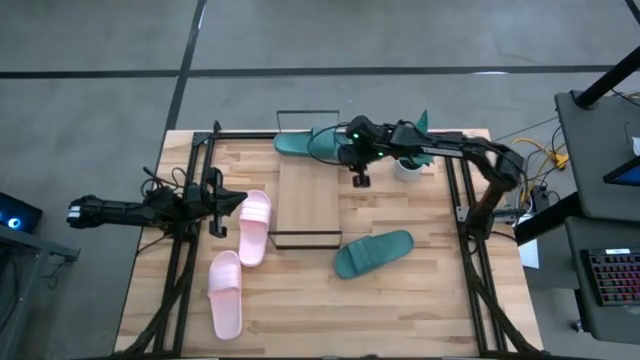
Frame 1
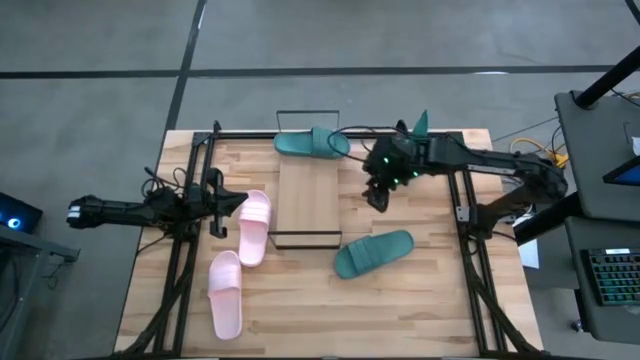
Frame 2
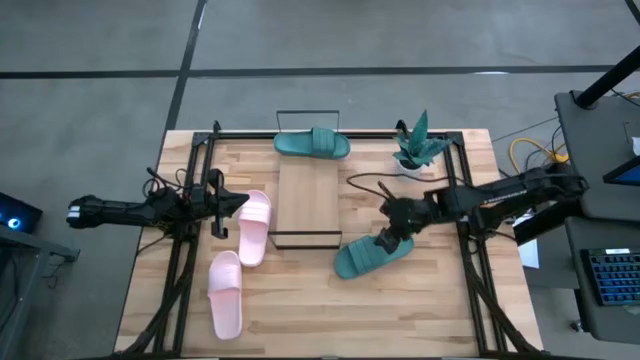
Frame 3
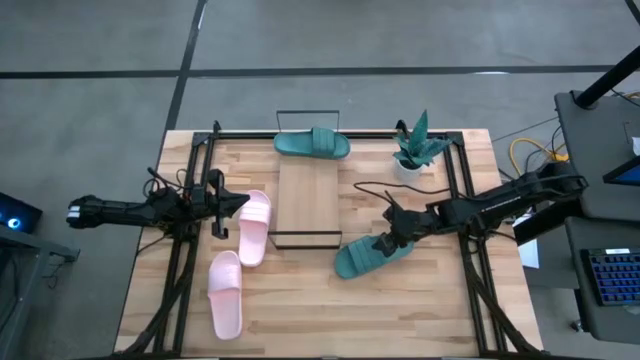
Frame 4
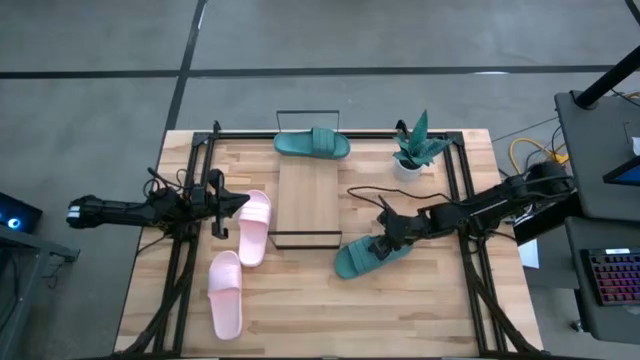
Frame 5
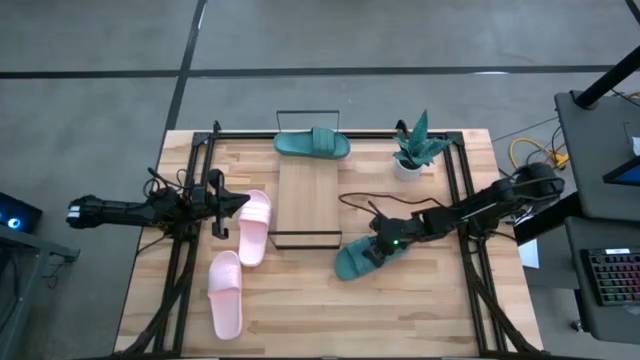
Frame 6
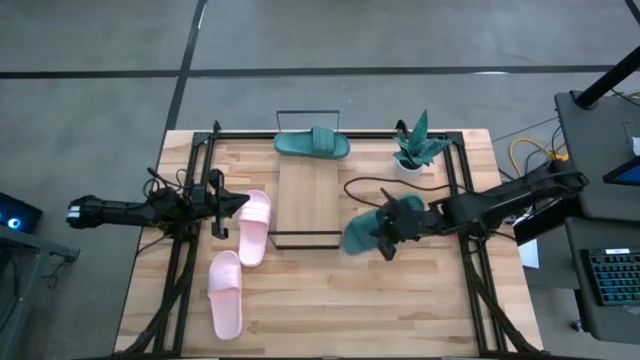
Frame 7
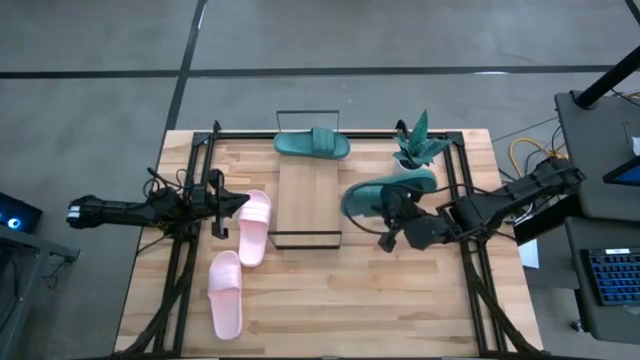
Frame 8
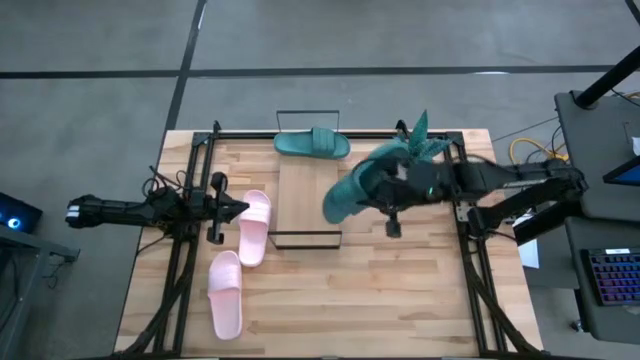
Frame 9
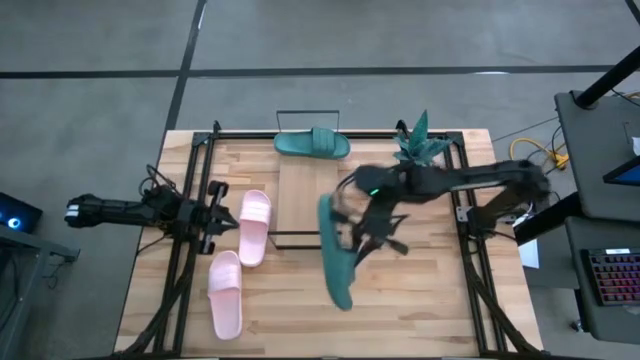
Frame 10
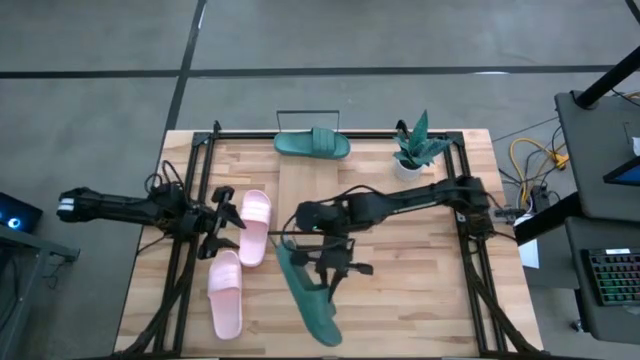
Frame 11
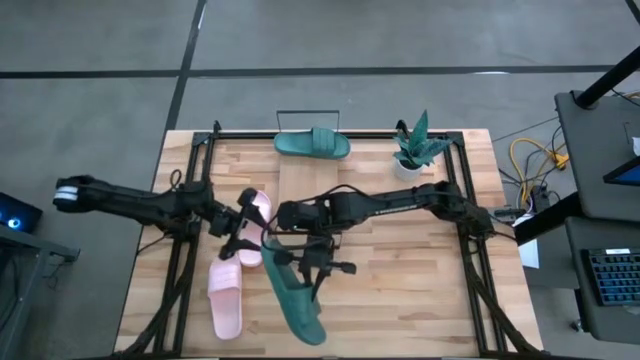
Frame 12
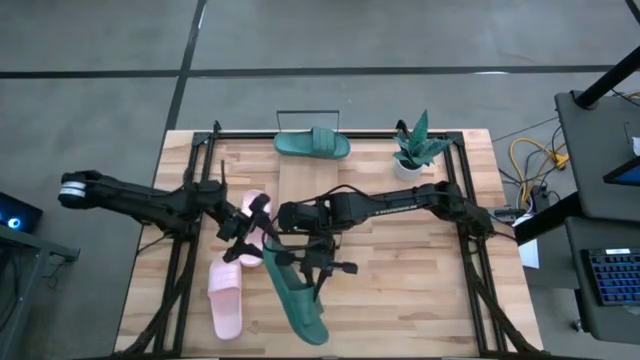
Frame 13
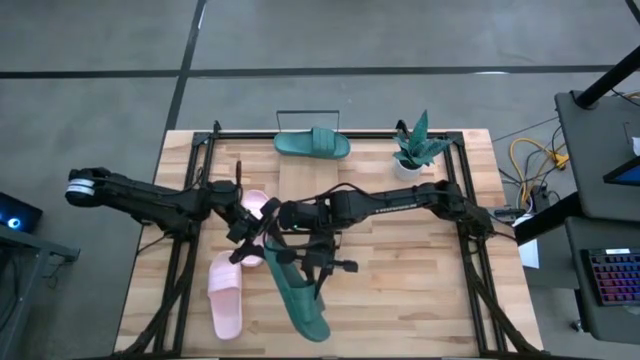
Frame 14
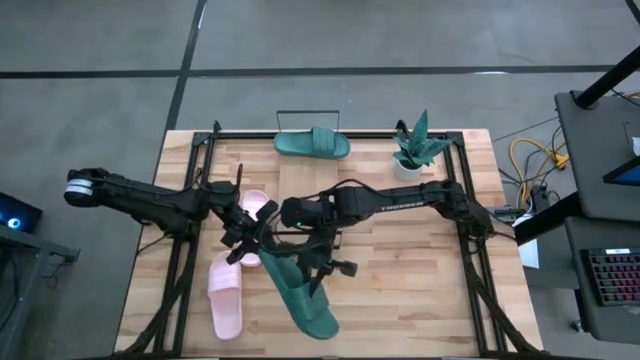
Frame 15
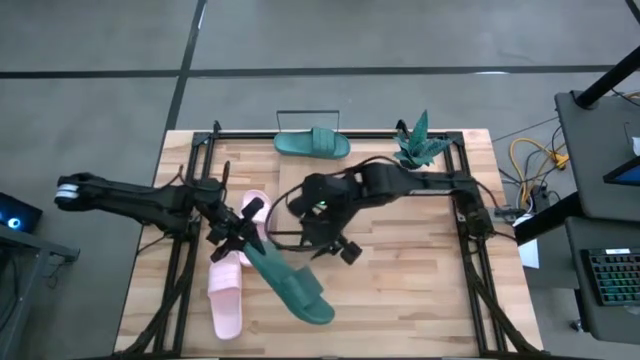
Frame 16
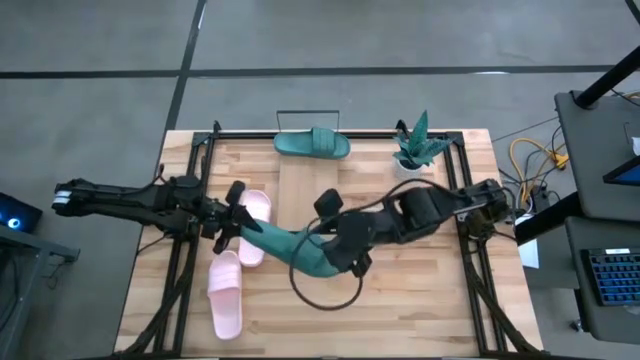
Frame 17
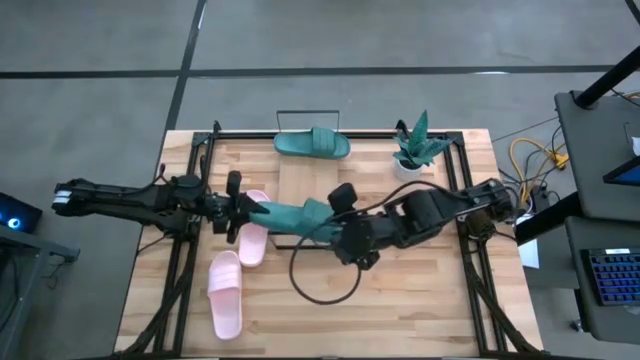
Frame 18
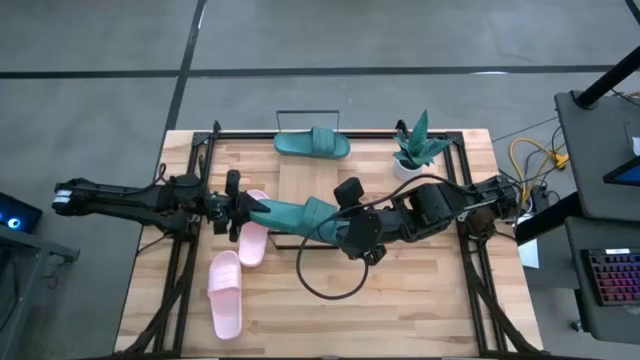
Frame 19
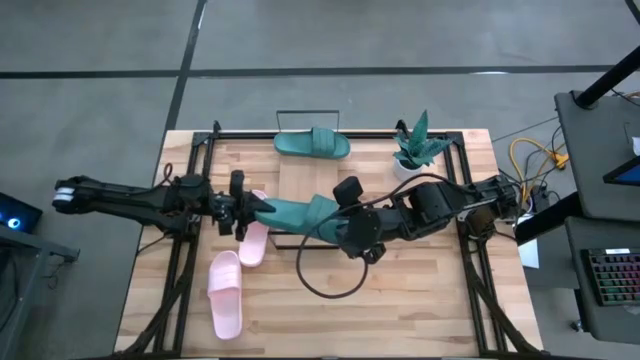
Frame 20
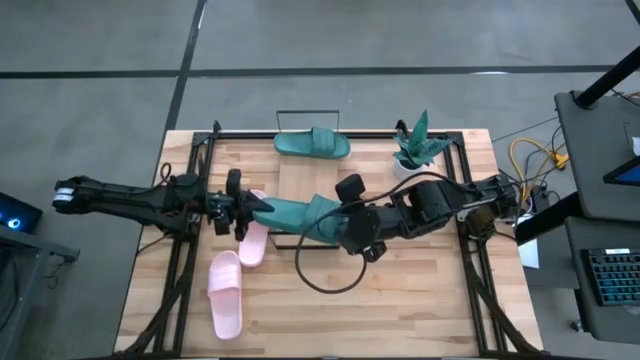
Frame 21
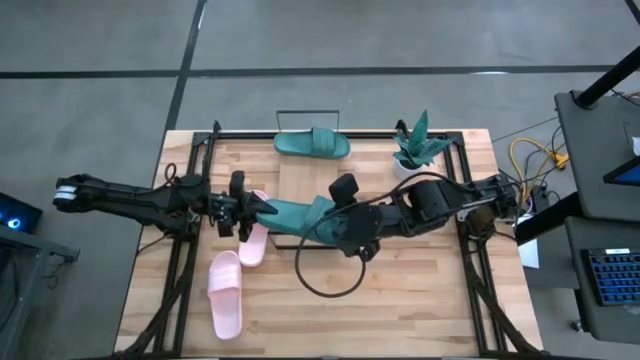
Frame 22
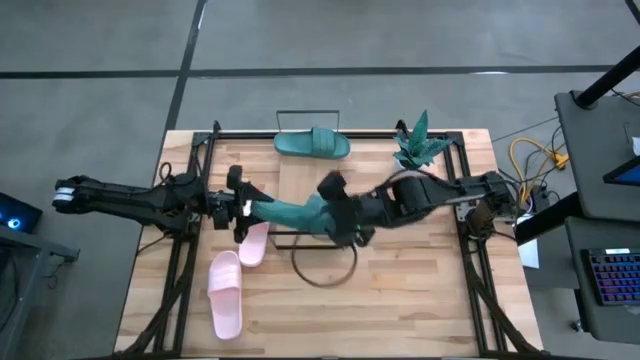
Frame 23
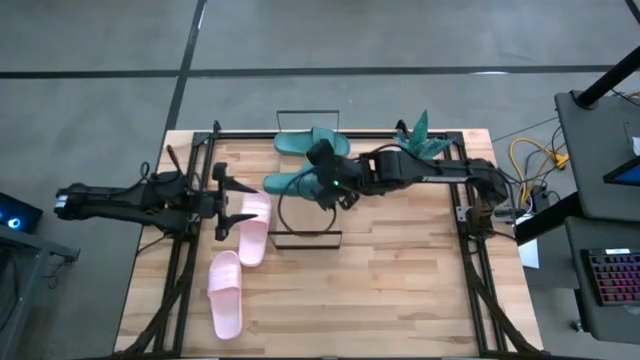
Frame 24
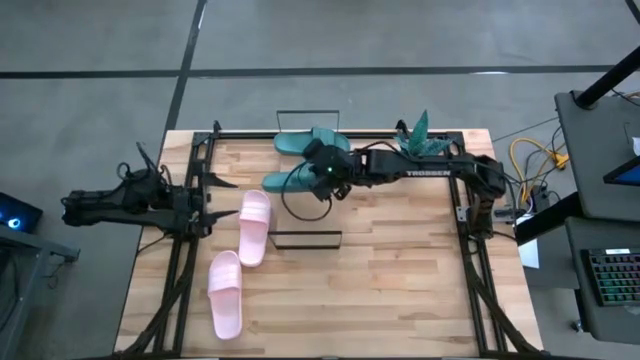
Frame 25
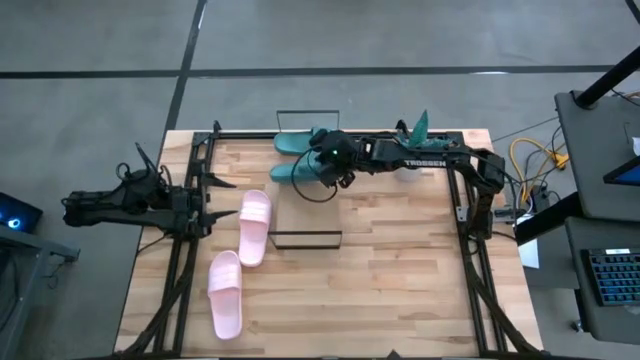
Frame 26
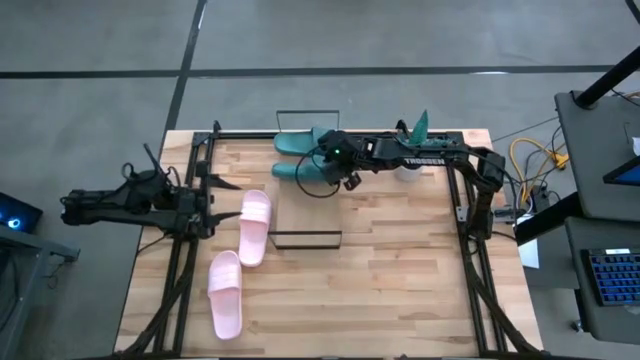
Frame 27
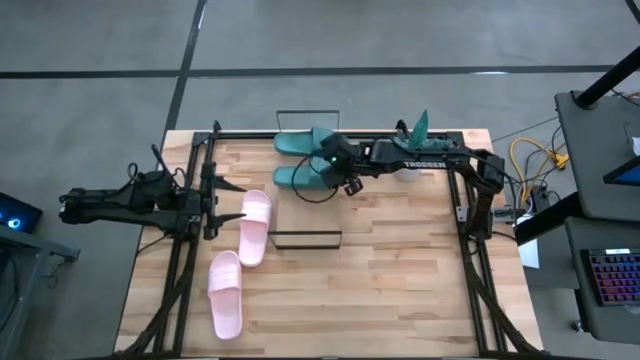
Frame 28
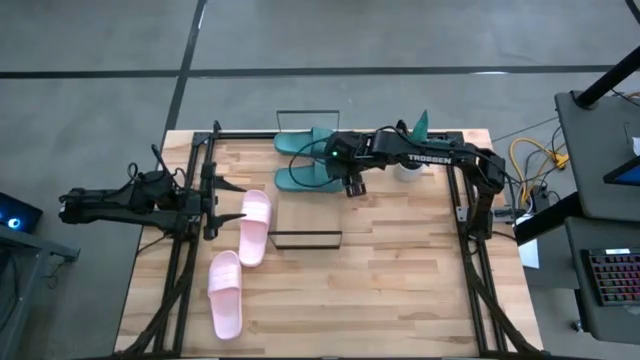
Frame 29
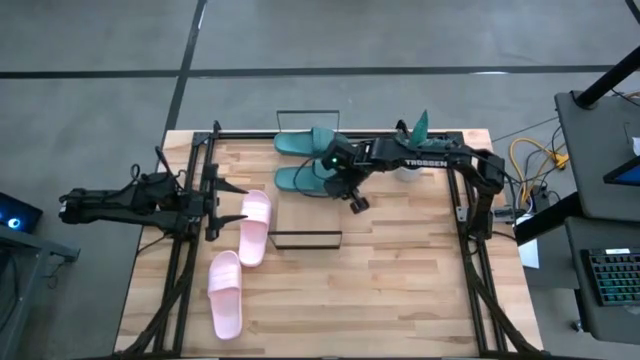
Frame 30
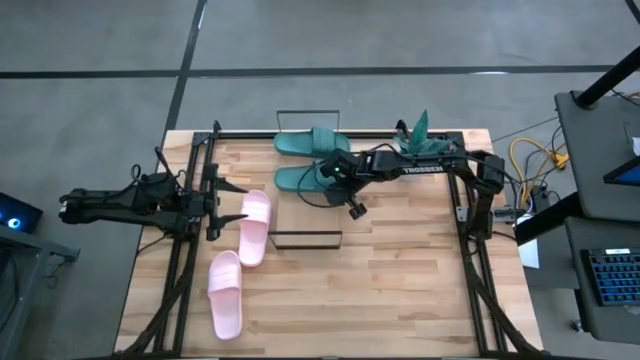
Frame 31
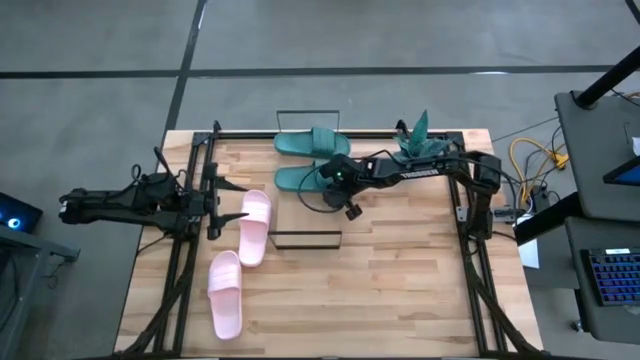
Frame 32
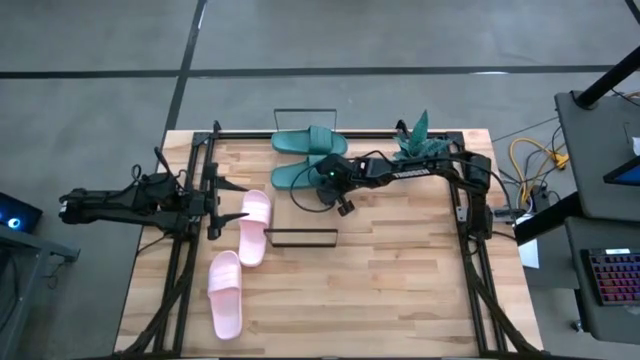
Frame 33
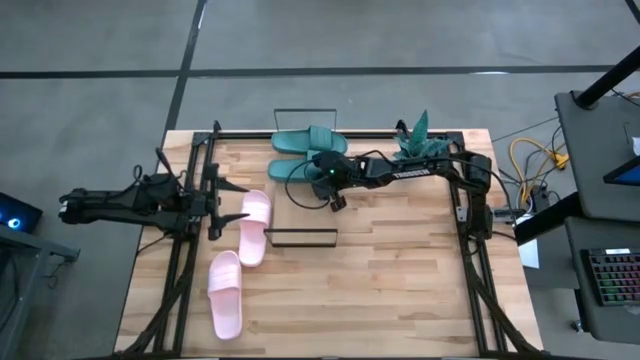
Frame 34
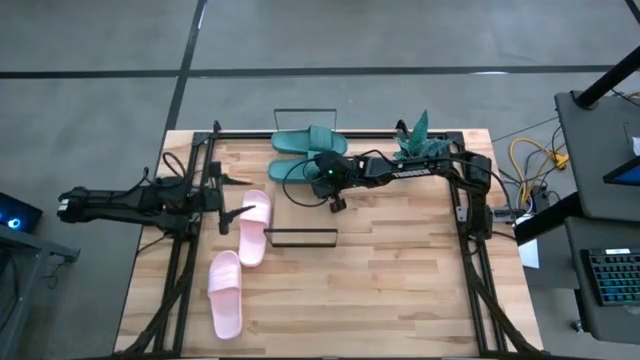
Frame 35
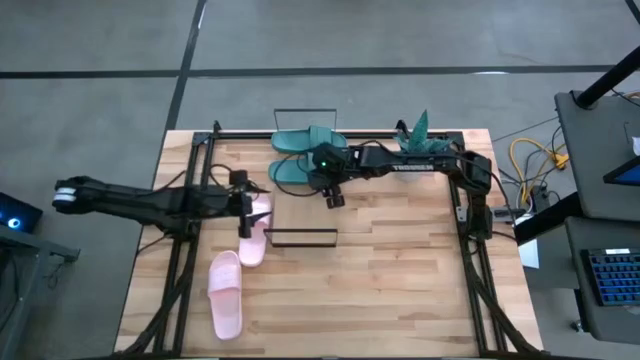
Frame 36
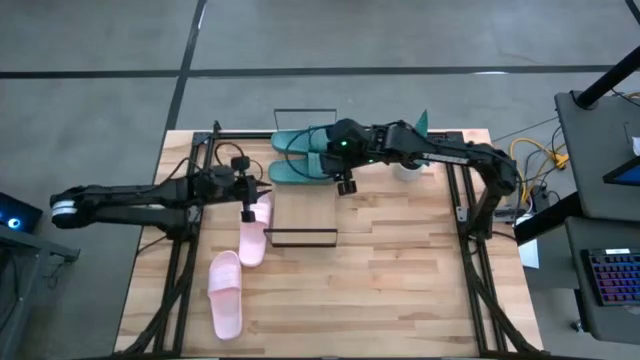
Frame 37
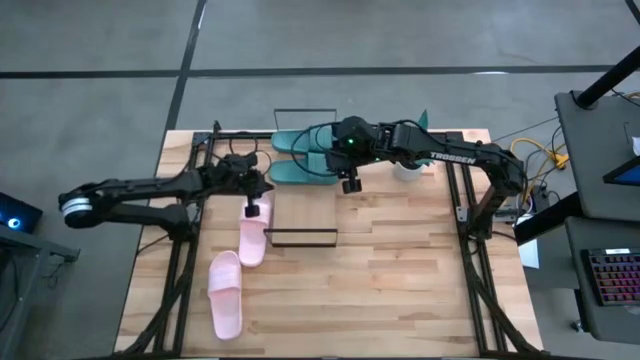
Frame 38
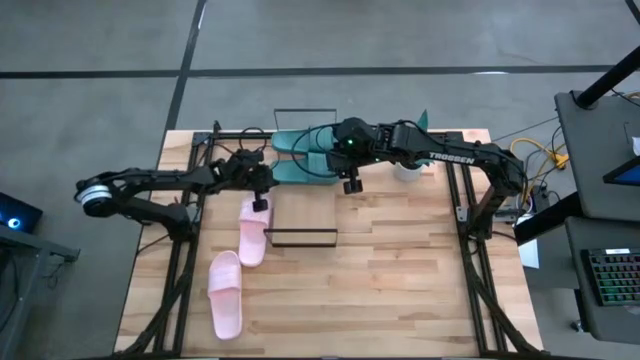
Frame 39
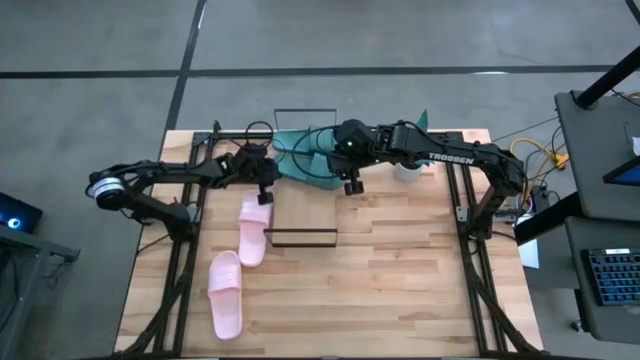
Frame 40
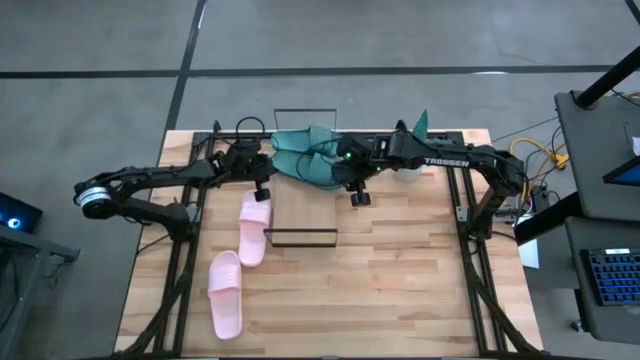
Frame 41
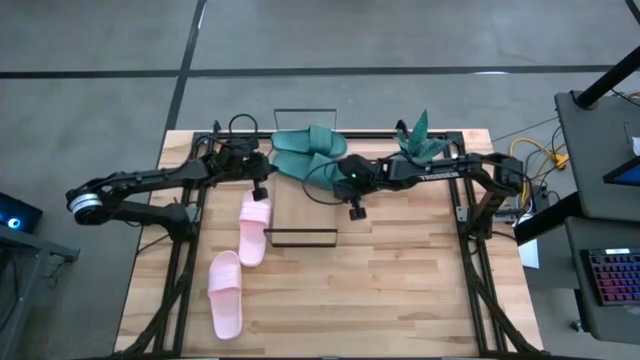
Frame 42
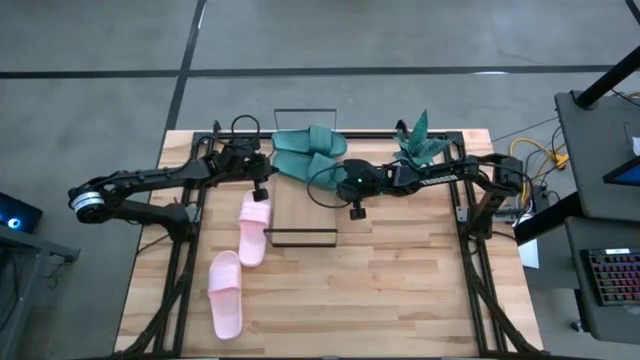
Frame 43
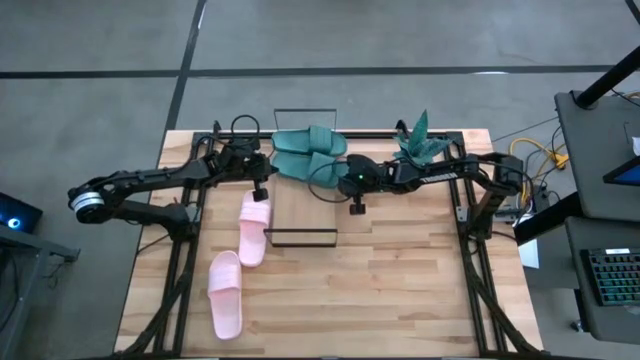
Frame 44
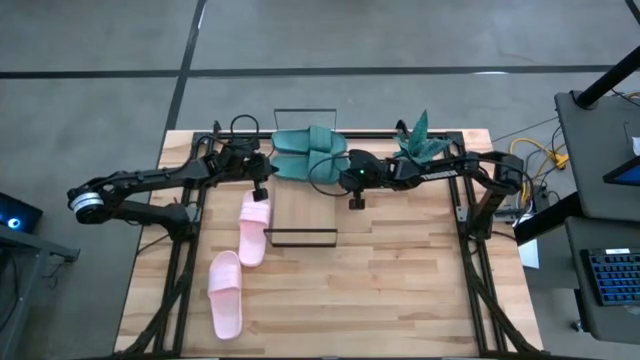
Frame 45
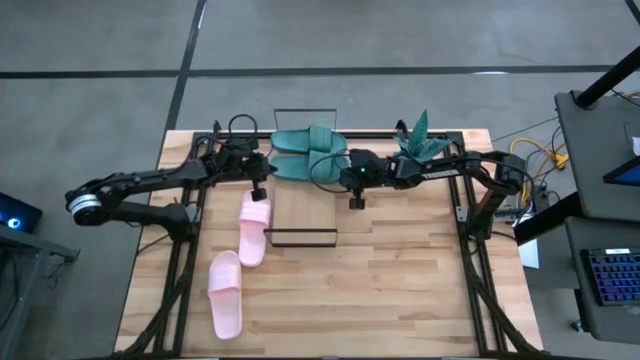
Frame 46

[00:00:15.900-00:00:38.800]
Task: Pick and place slides into the shelf
Put the green slides on the shelf
